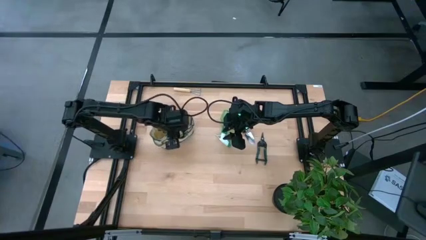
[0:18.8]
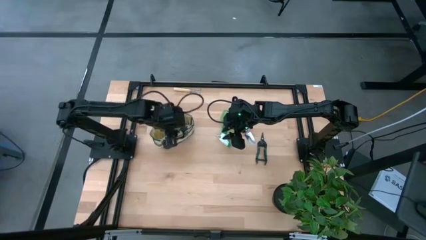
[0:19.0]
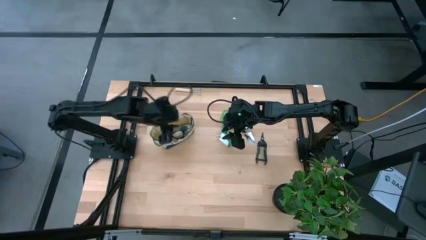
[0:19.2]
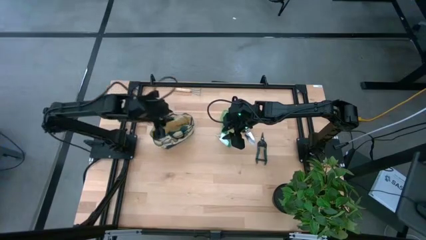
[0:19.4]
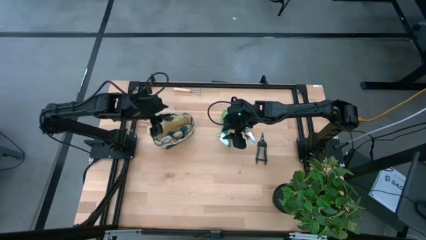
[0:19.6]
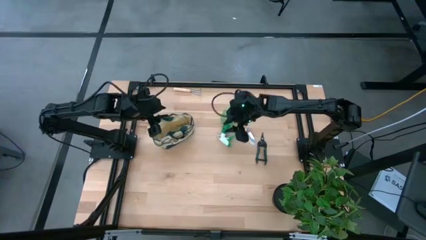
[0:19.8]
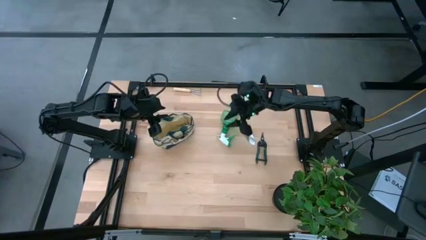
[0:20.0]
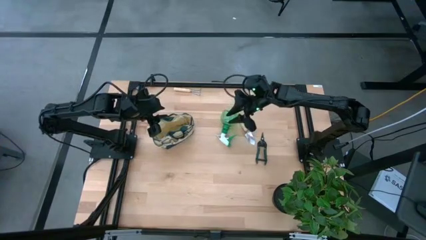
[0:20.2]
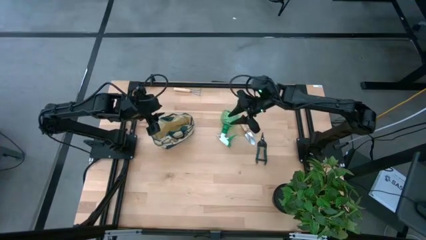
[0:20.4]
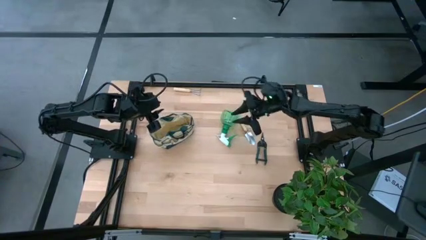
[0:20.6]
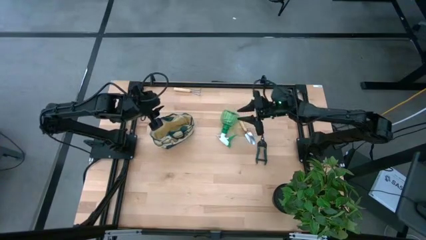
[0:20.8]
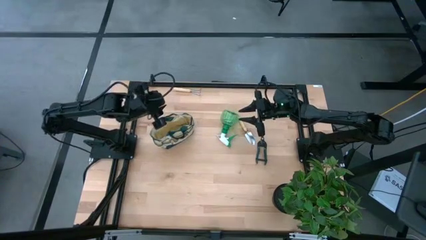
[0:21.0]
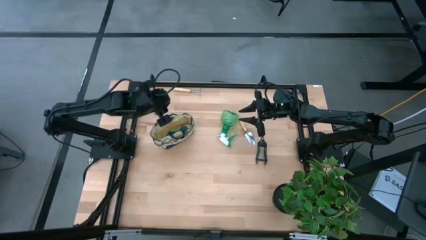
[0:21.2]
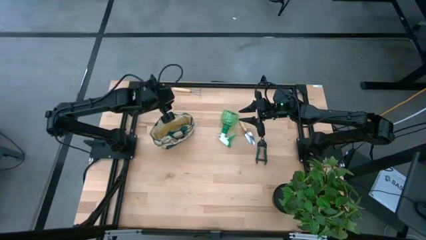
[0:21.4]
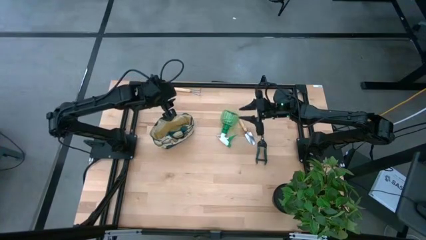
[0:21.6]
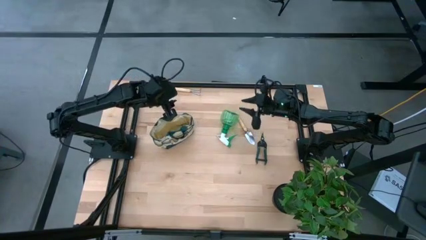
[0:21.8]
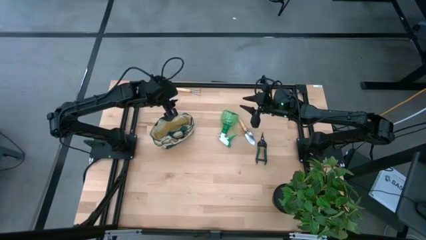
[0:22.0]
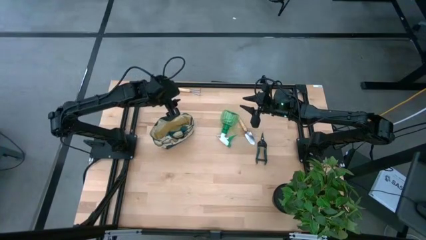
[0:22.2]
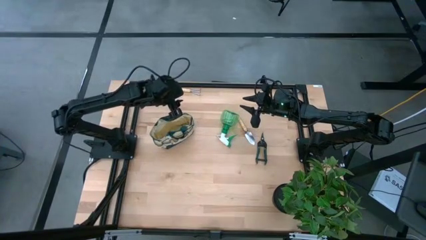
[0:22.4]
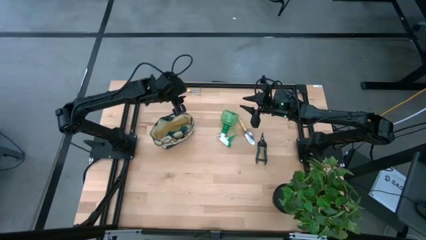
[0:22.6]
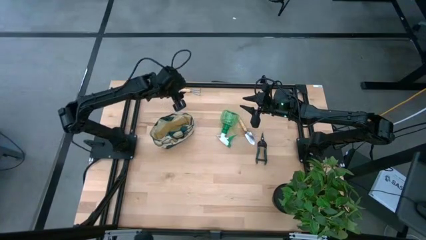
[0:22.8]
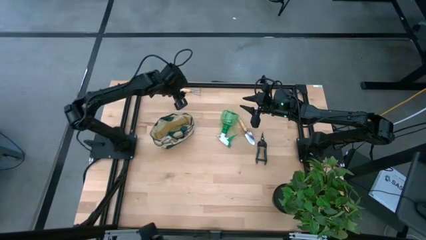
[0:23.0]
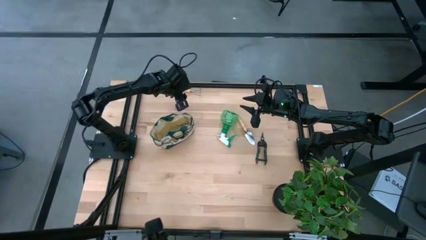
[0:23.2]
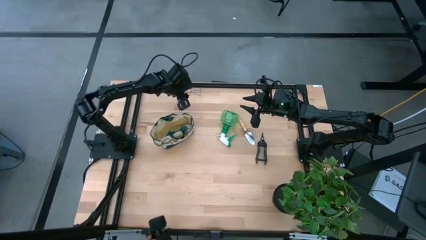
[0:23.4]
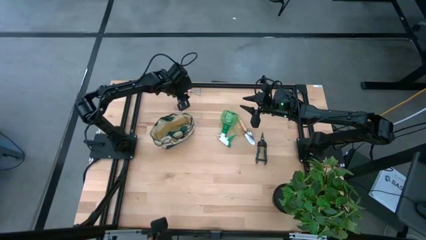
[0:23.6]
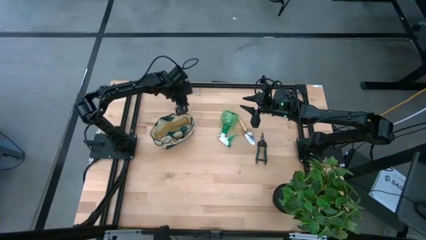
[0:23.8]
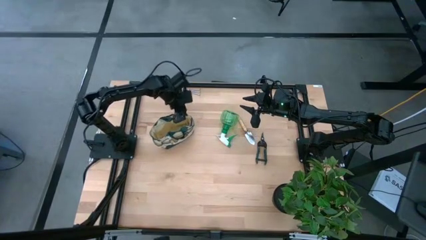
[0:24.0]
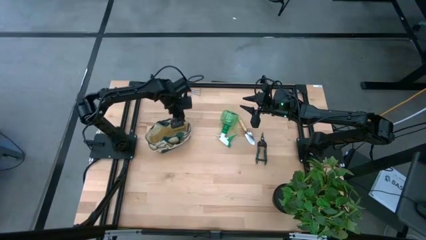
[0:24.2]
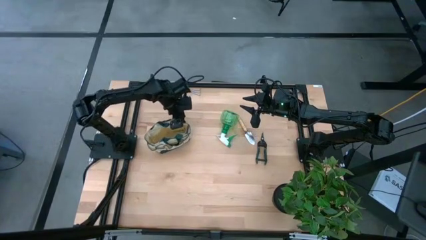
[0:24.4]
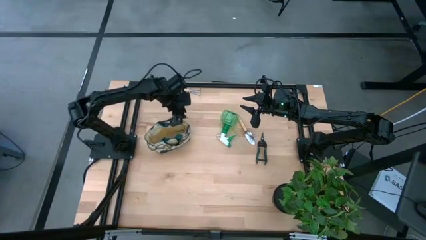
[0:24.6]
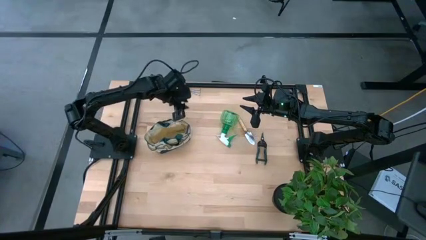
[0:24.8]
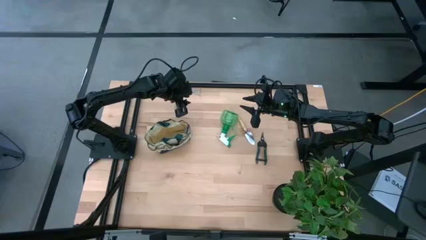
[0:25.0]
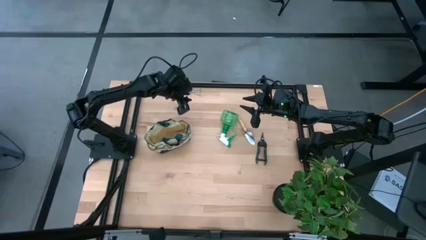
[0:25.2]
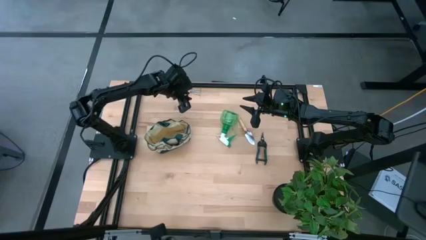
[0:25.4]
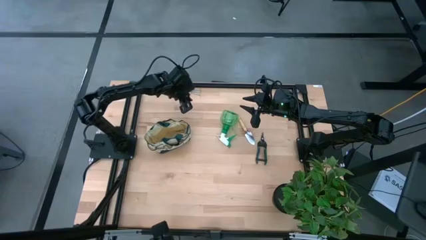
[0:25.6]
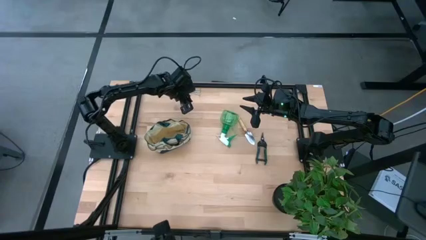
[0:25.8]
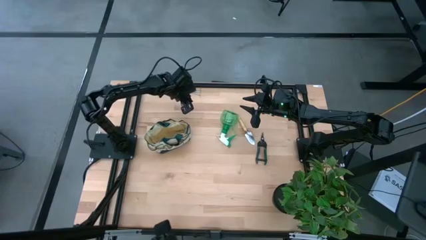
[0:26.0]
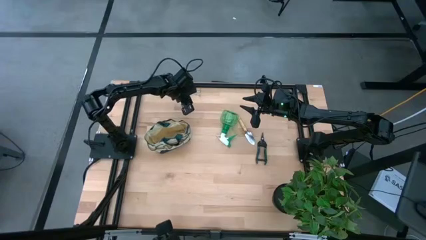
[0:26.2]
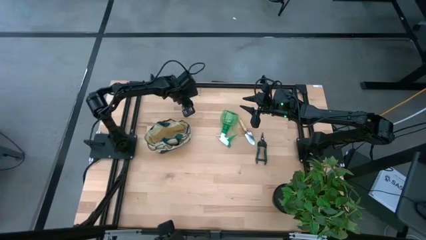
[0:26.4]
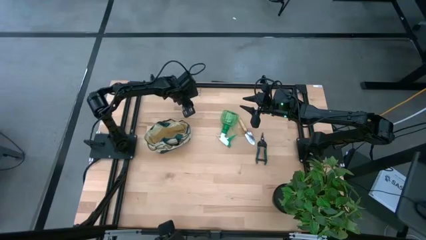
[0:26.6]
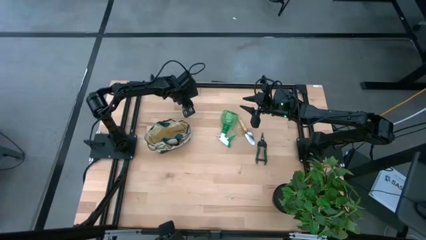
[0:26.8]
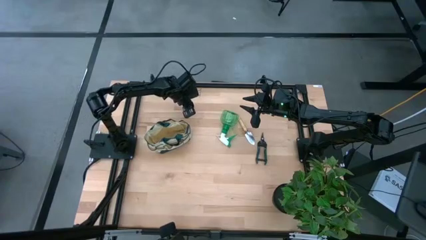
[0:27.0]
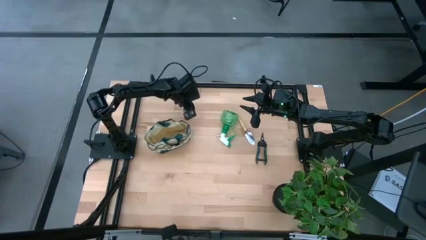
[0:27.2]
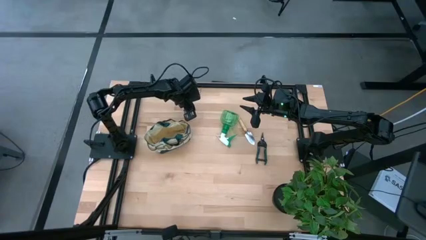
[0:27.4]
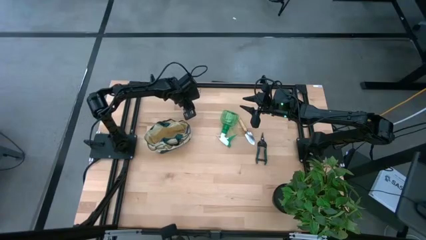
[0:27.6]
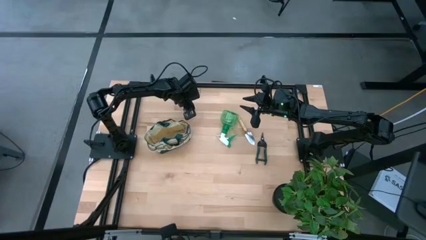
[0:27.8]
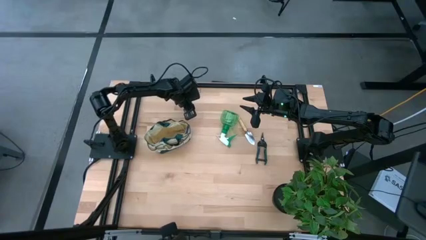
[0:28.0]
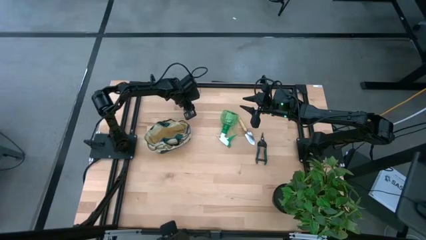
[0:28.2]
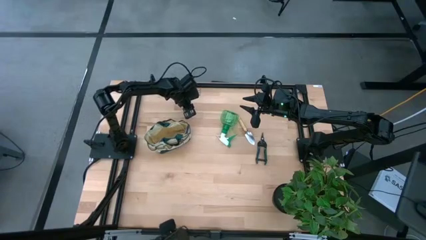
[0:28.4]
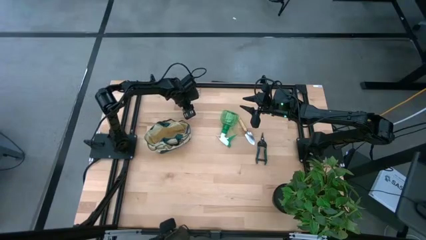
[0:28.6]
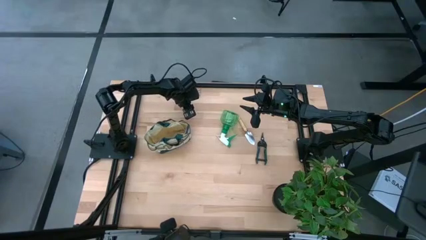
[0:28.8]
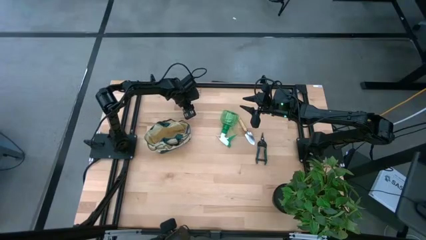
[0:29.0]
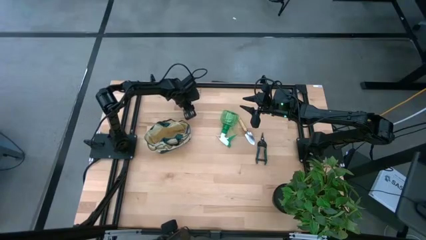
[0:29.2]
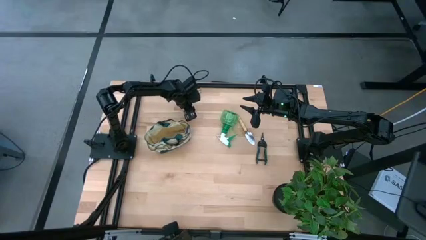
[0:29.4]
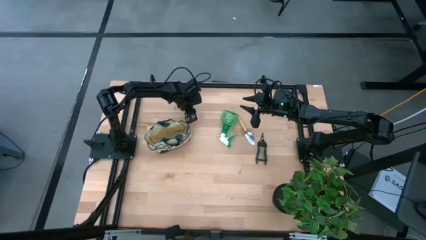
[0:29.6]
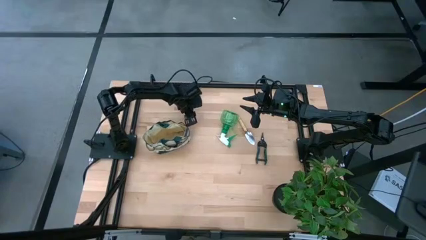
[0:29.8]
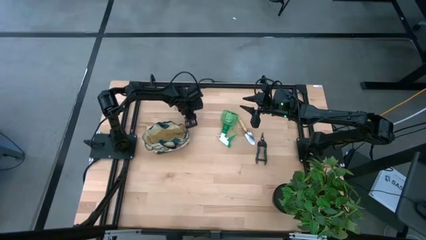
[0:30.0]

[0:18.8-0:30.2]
Task: Pick & Place Garden tools in Gardening bag
Put the brown hand rake into the gardening bag
